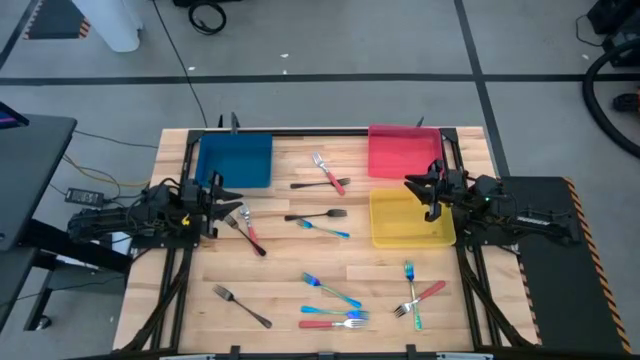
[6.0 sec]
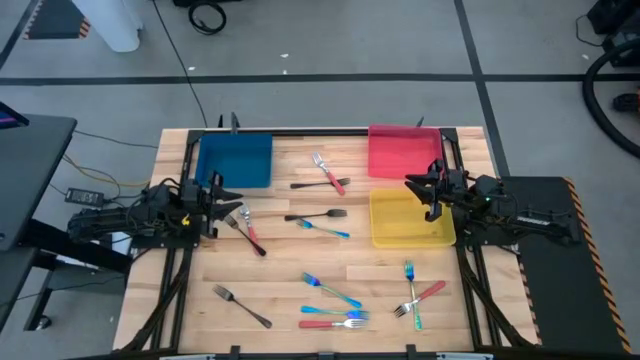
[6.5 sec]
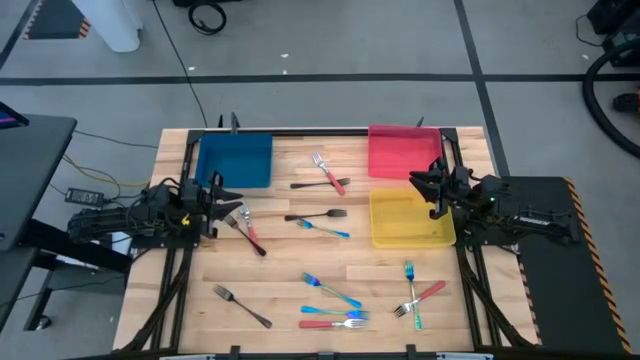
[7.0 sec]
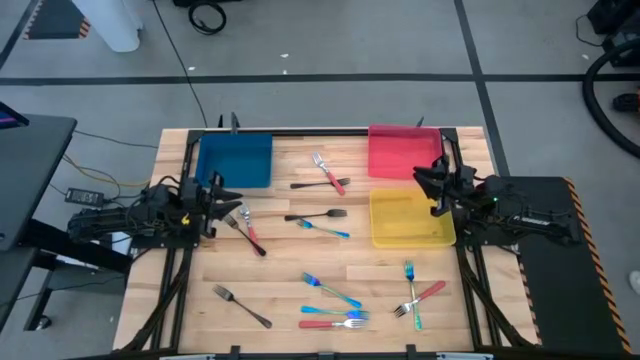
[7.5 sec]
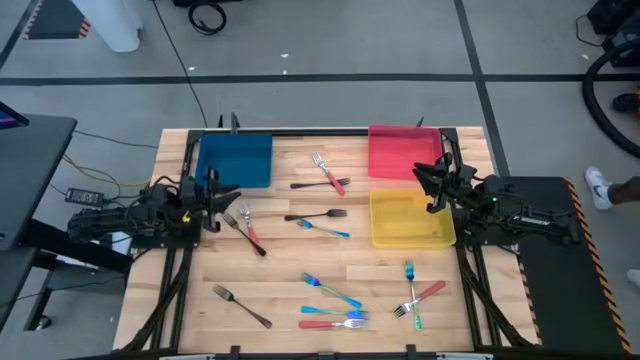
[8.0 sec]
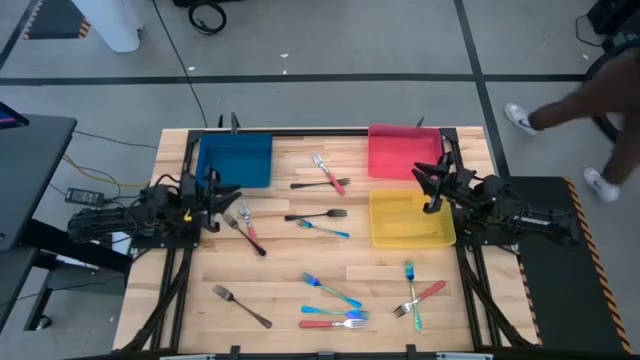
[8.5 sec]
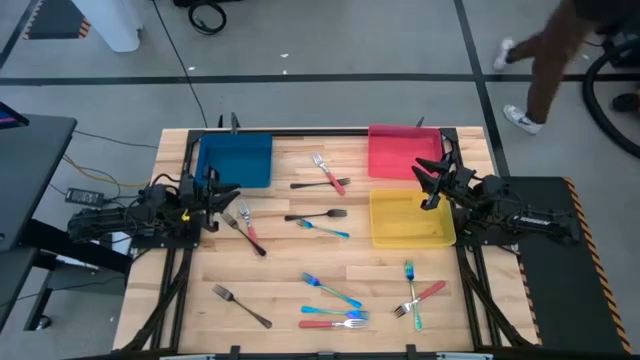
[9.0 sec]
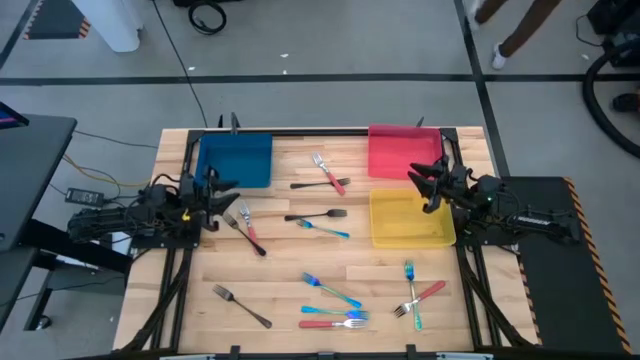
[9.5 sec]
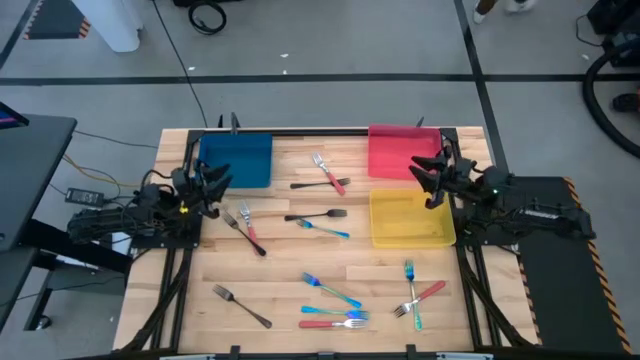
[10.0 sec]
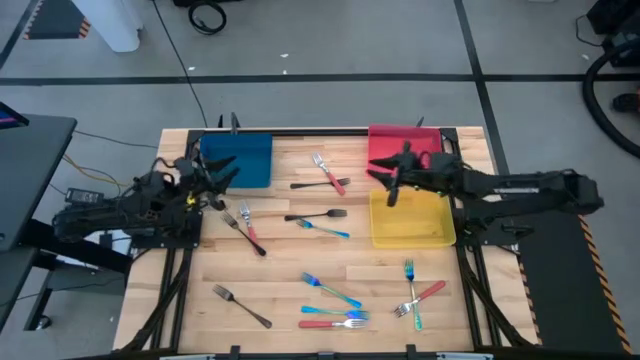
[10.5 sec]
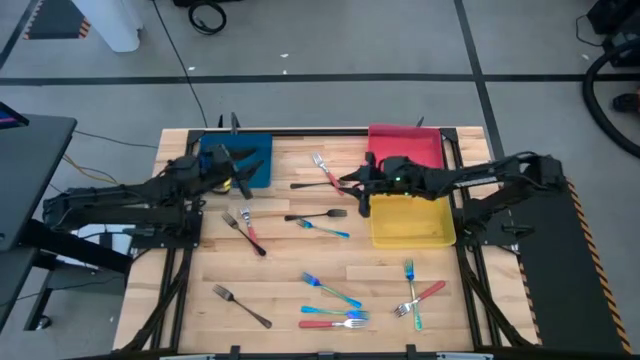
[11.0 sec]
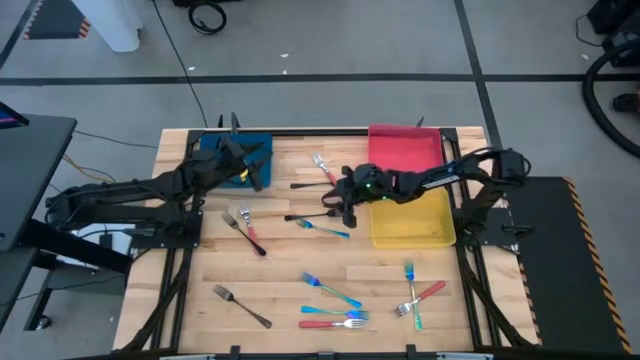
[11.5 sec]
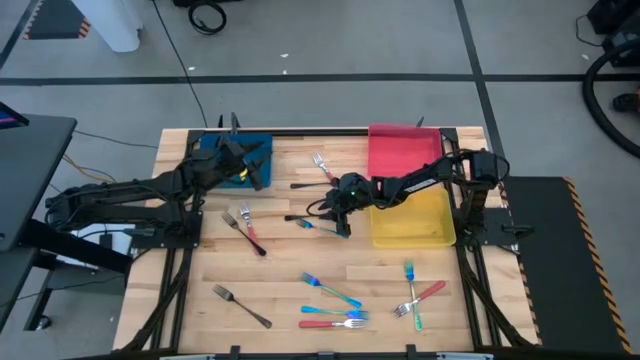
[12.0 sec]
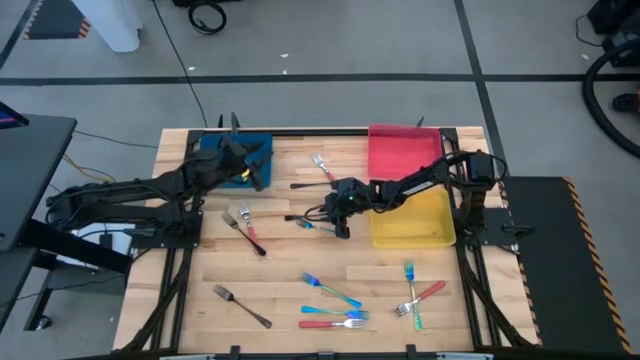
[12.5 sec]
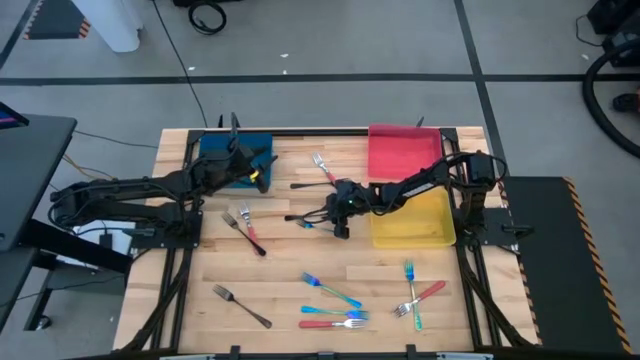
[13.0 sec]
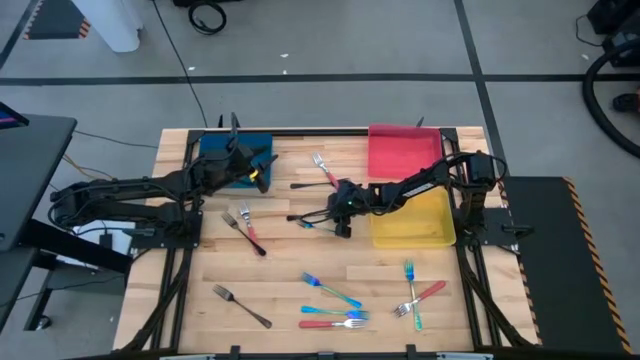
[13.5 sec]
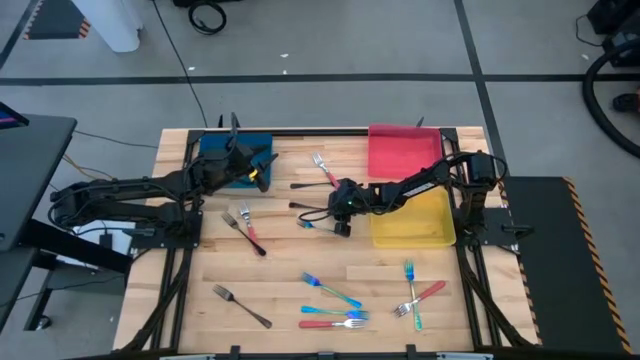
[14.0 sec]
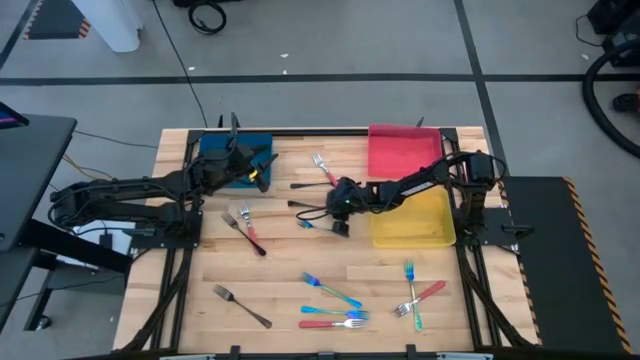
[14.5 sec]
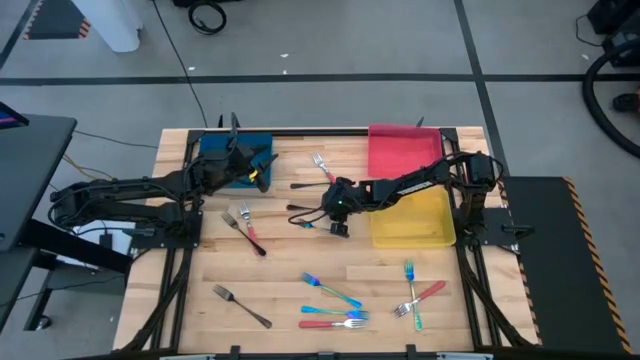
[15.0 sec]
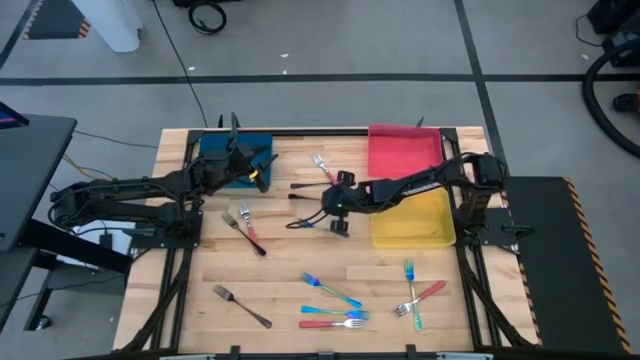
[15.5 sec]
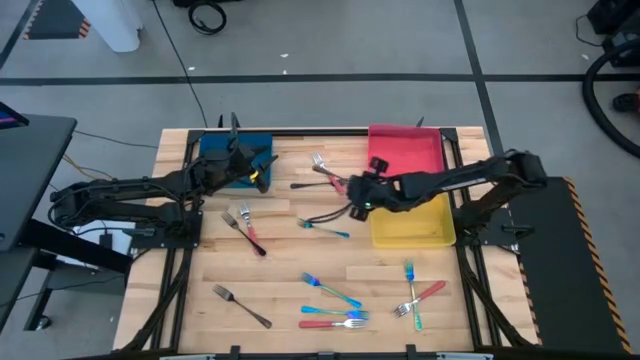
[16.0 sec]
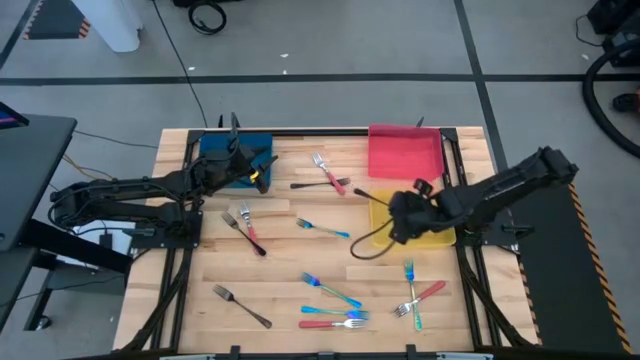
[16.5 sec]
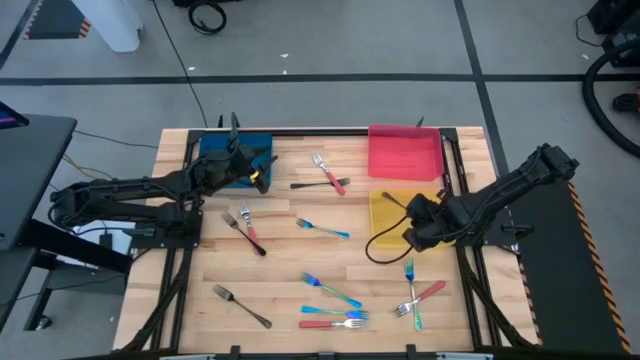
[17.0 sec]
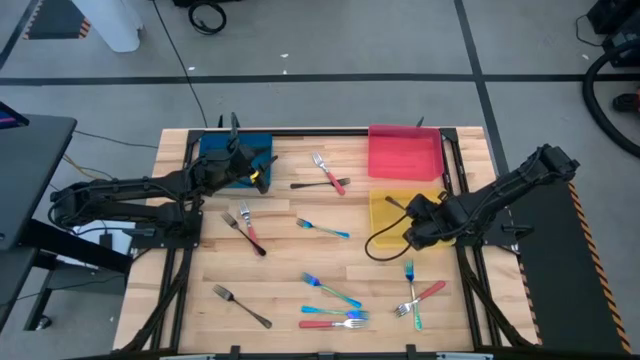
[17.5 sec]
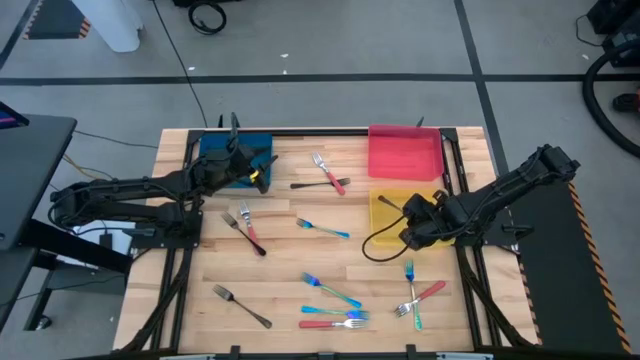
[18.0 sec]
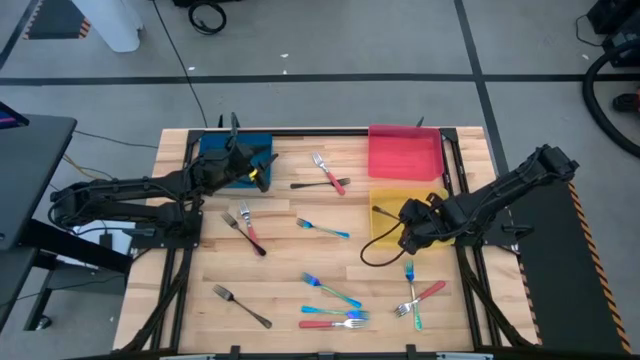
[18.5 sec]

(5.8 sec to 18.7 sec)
Task: Sort silverware by color (type)
Put the black fork into the yellow bin
